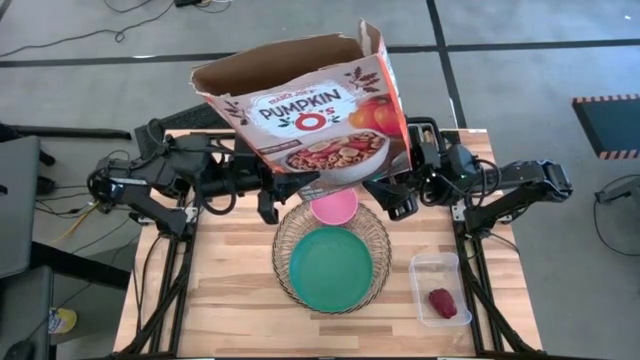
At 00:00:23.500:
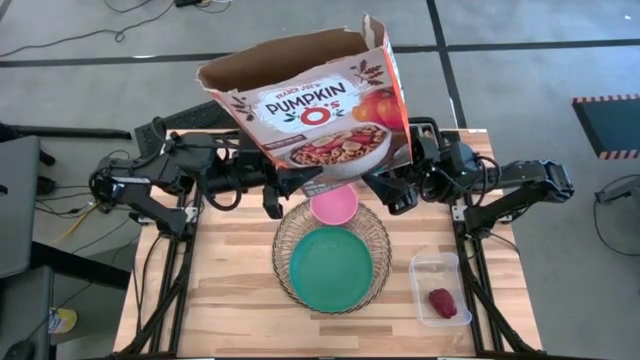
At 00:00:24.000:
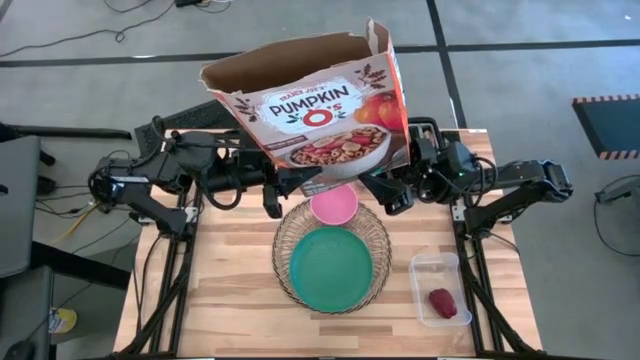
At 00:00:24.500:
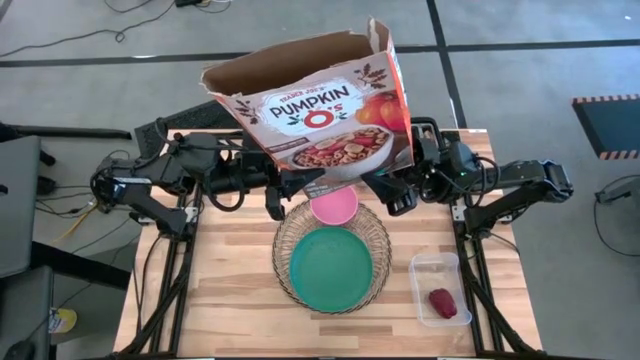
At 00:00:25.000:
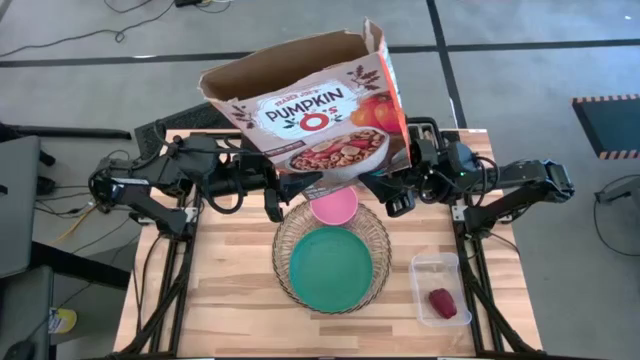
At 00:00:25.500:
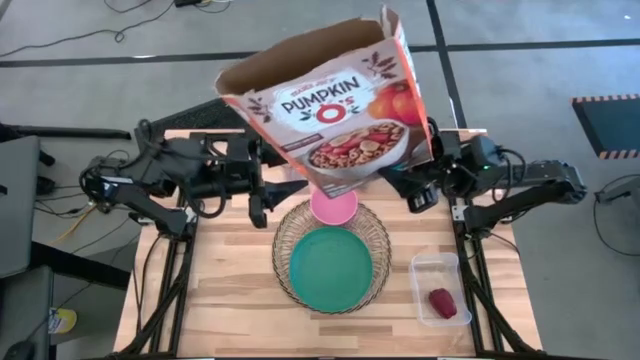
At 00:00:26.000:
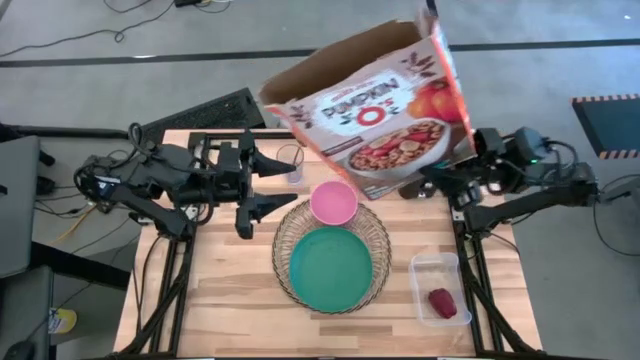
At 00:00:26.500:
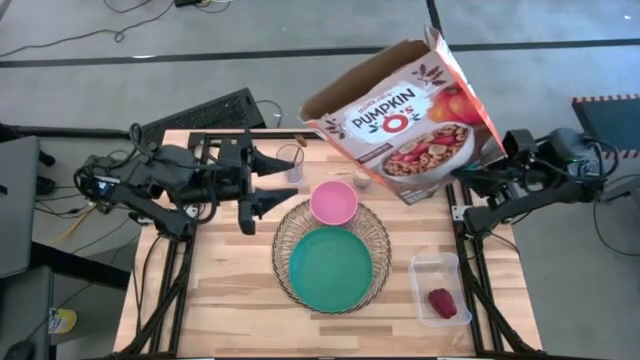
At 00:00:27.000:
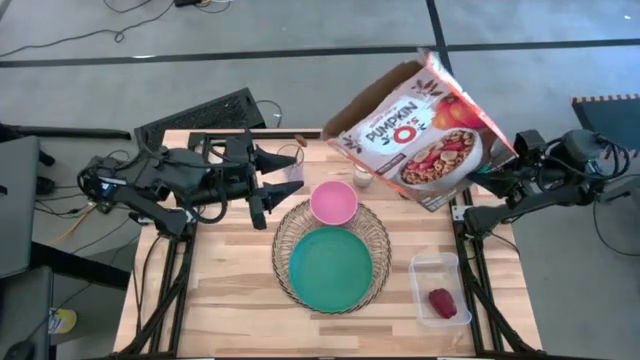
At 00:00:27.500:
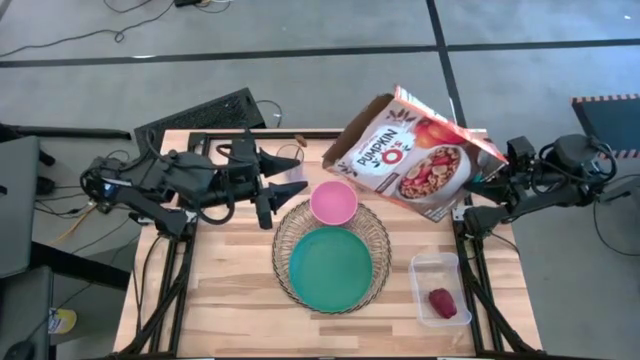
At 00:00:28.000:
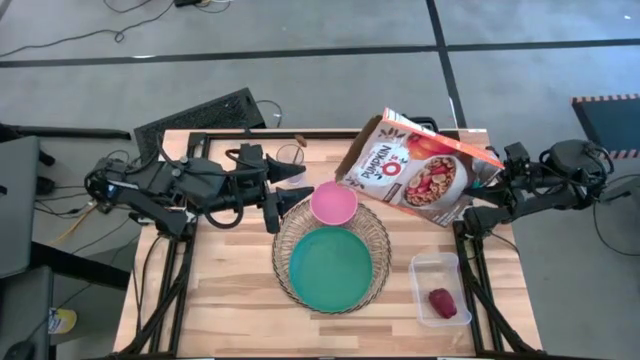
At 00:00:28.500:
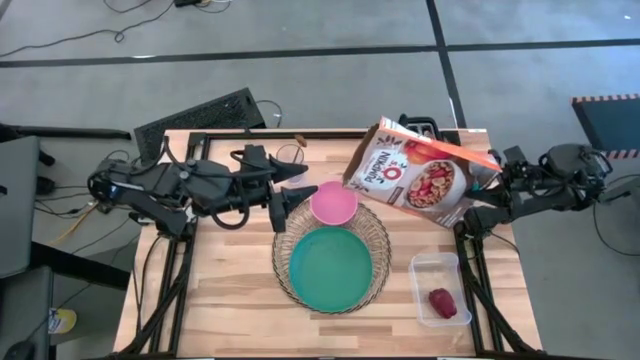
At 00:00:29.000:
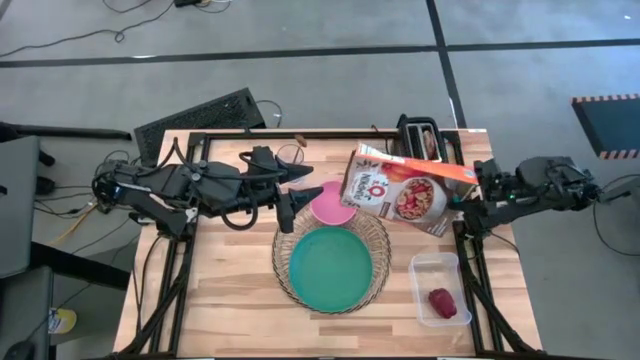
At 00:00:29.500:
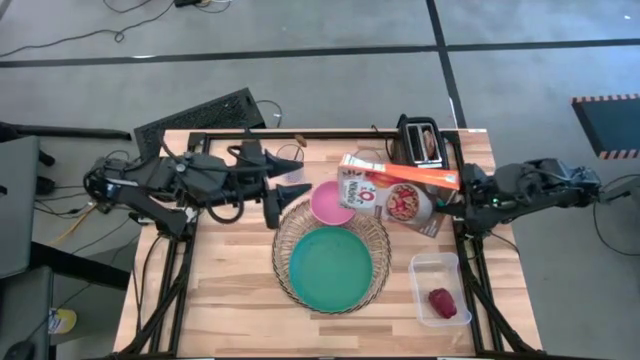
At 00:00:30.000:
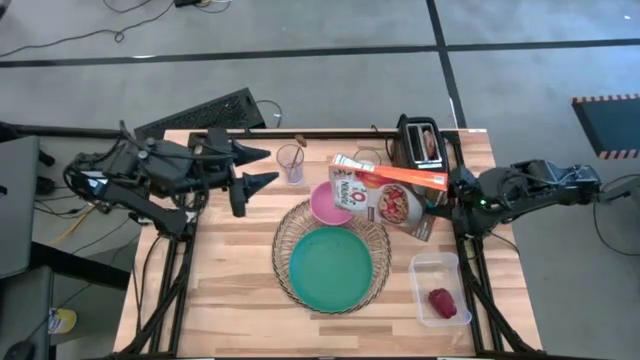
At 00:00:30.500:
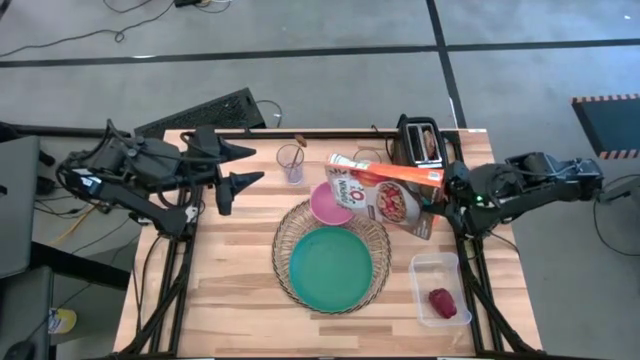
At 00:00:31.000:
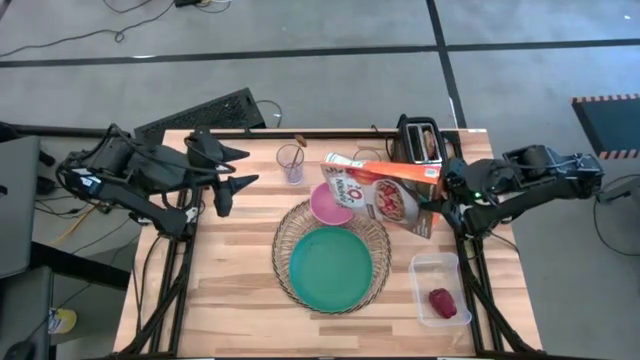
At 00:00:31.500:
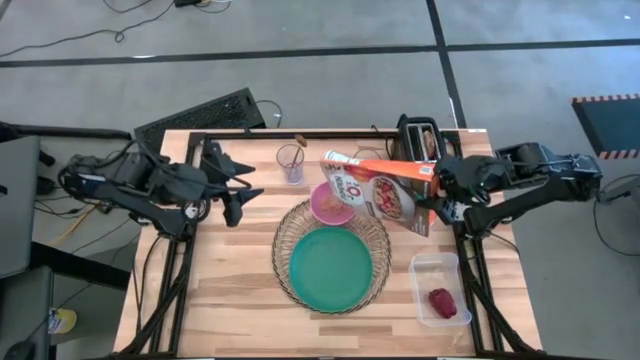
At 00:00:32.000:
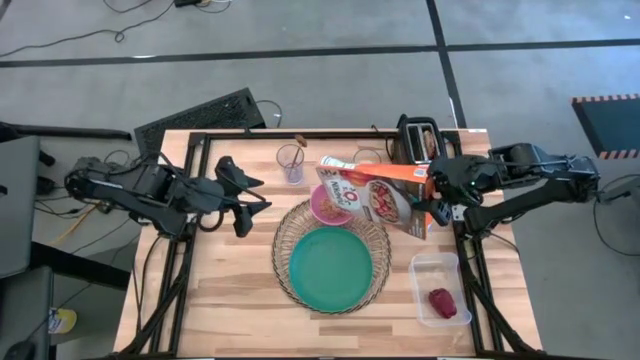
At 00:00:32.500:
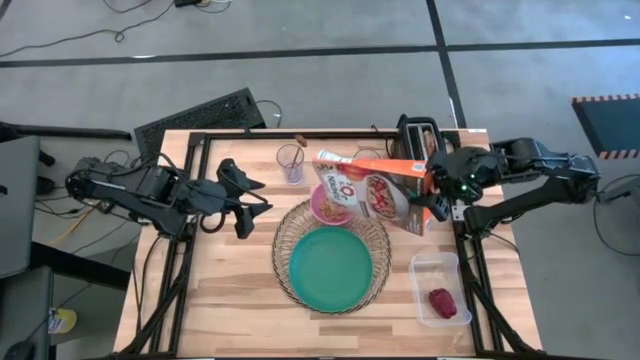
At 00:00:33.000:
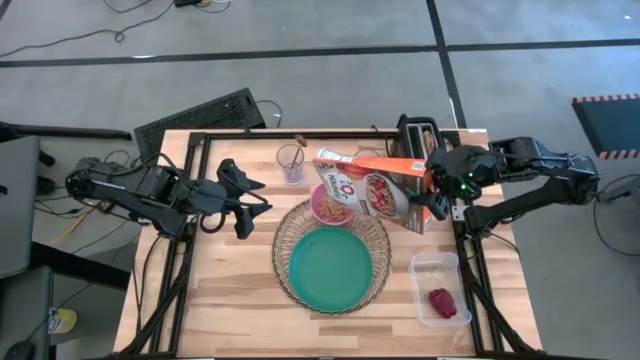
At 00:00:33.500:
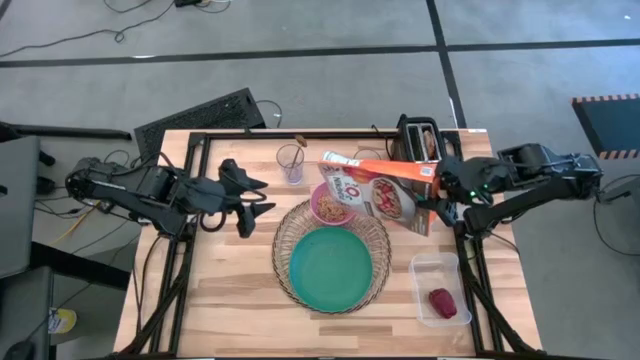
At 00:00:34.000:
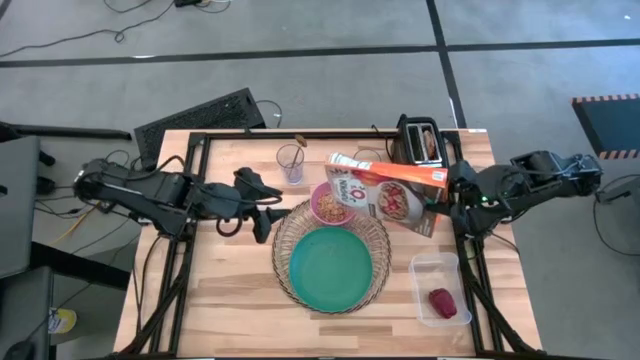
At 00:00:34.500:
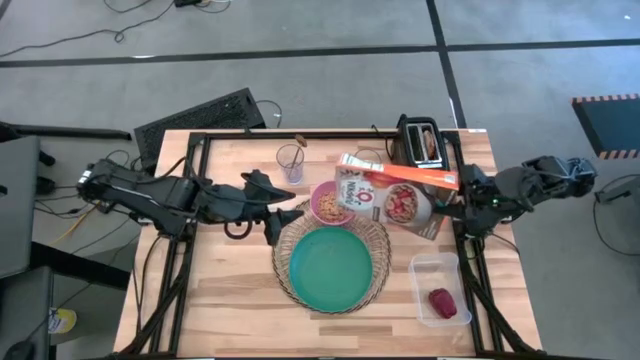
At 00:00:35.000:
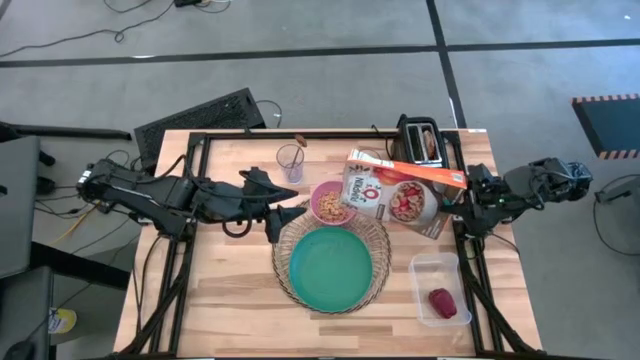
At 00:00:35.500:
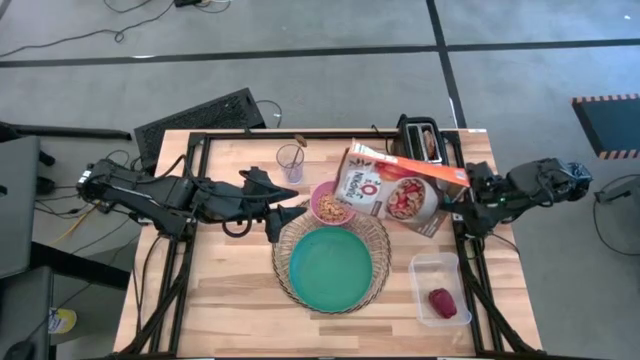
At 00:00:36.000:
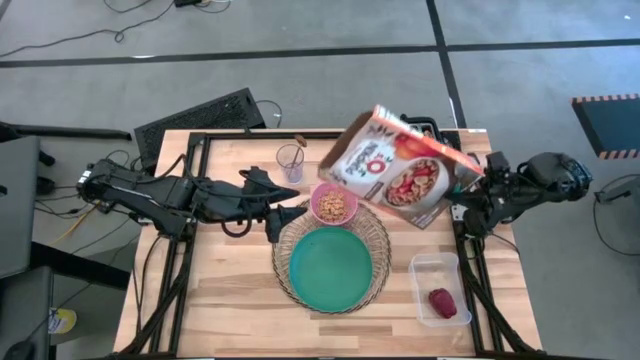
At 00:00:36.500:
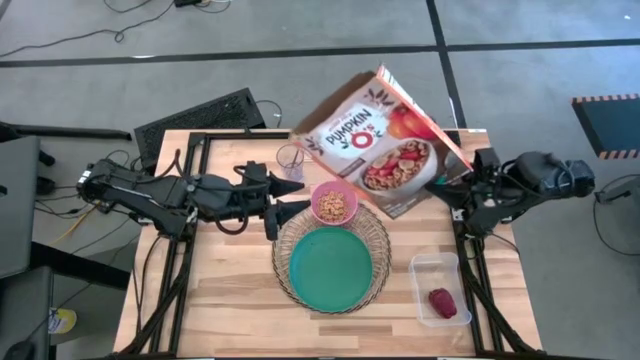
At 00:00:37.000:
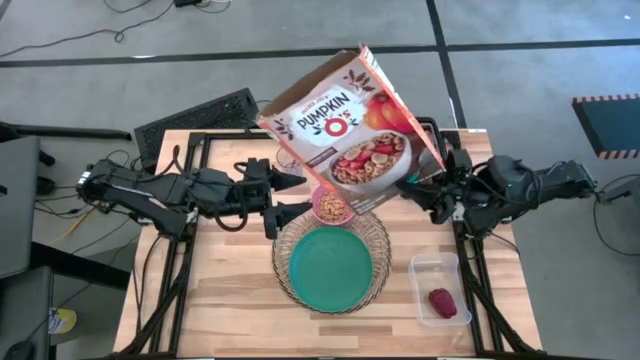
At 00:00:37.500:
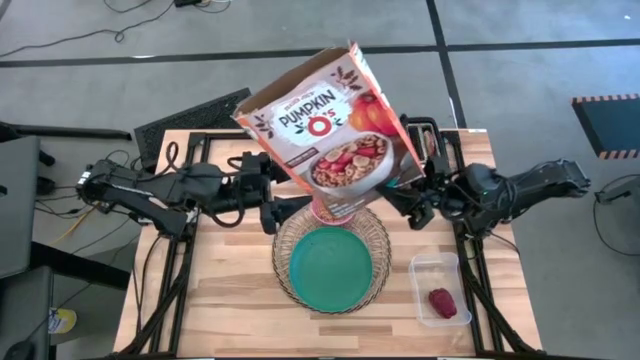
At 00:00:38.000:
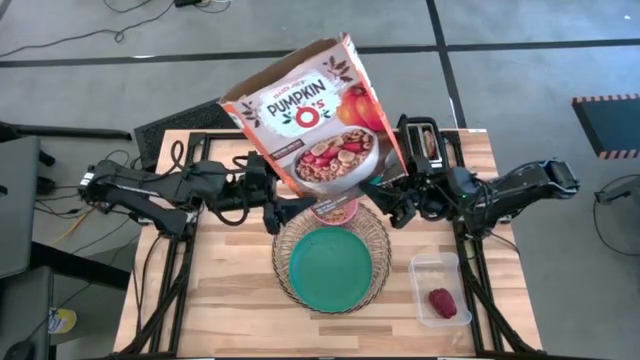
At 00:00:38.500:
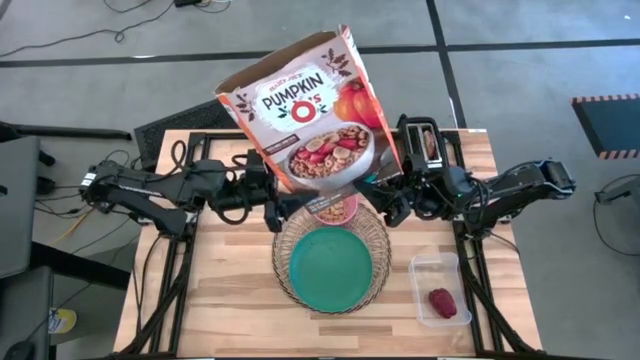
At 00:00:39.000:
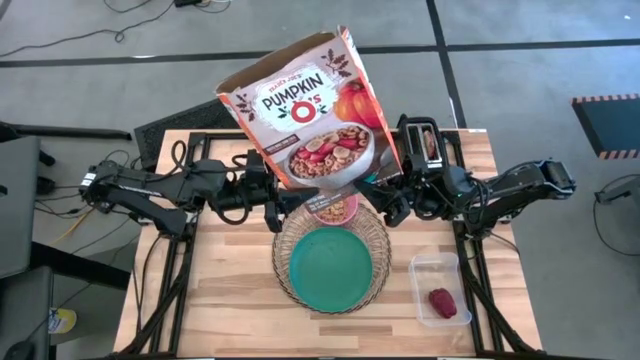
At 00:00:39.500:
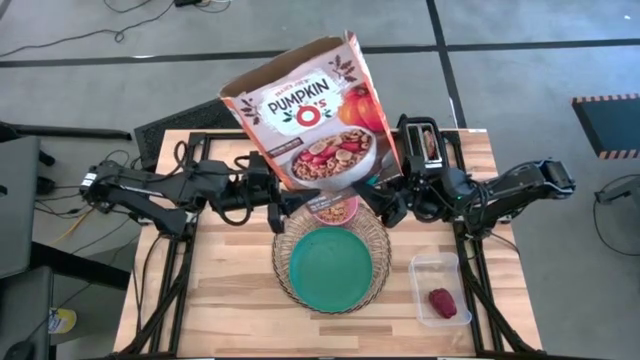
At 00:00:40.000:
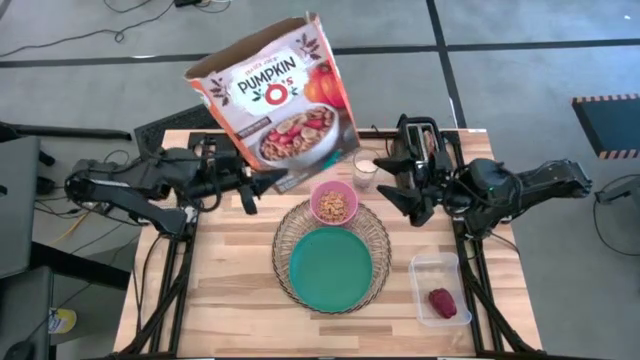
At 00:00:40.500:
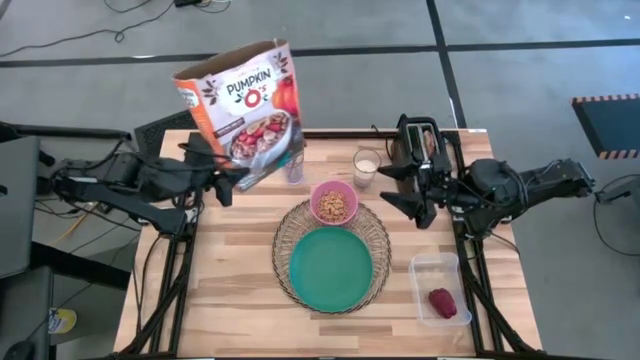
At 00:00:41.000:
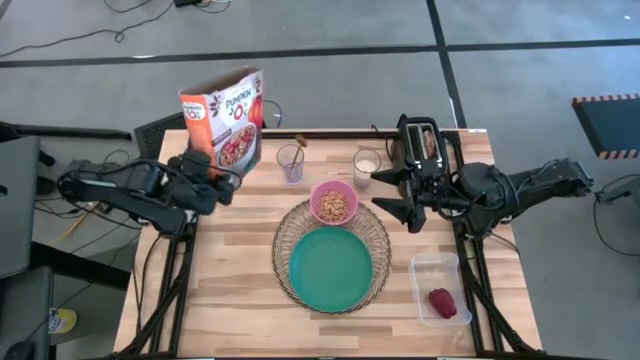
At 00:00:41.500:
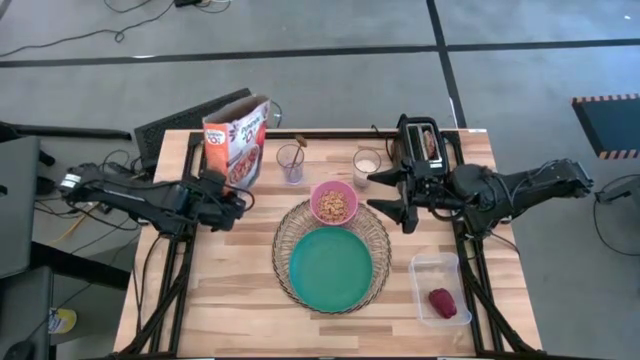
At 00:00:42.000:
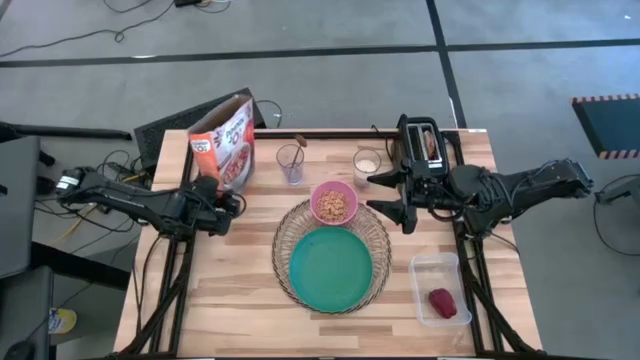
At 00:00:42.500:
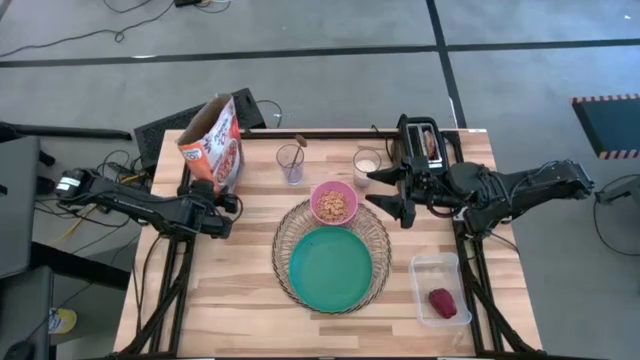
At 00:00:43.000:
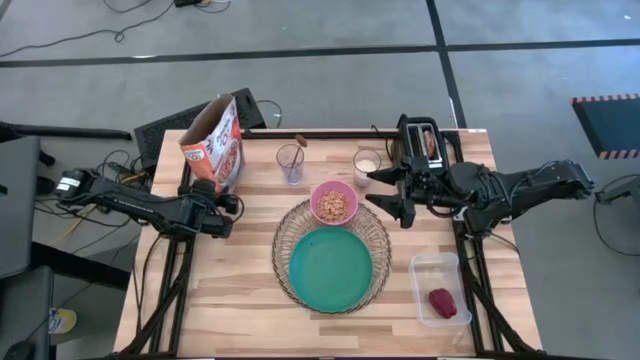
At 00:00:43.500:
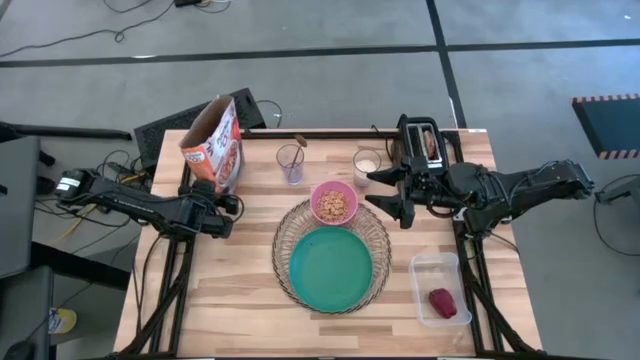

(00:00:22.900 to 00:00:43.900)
Task: Arrange a breakfast setting
Pour the cereal from the orange cereal box into the pink bowl
